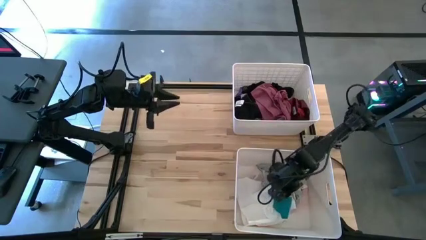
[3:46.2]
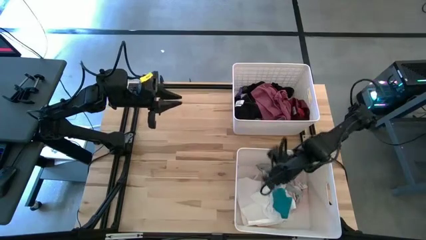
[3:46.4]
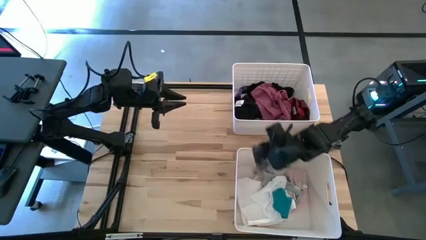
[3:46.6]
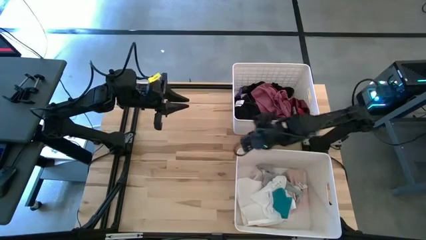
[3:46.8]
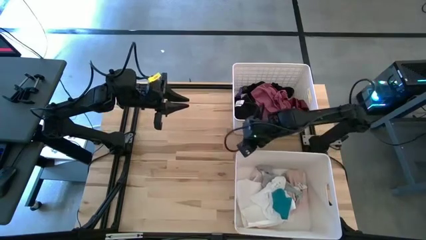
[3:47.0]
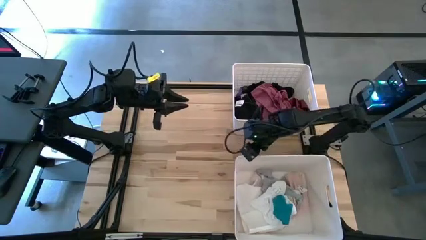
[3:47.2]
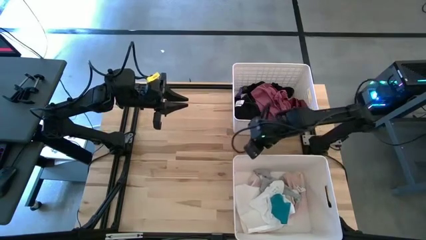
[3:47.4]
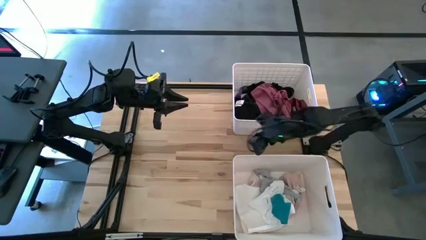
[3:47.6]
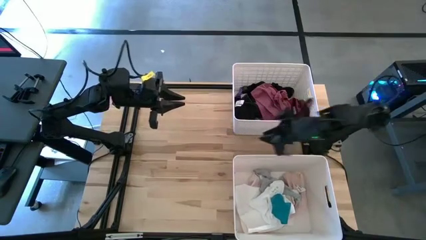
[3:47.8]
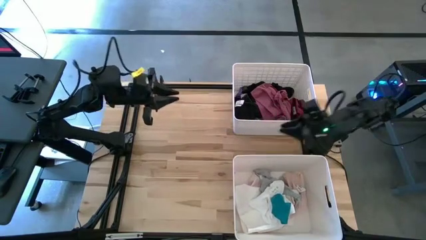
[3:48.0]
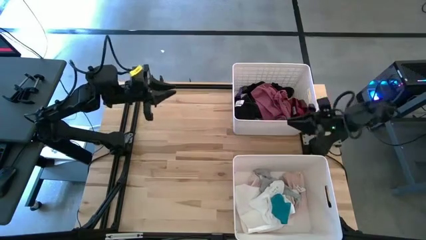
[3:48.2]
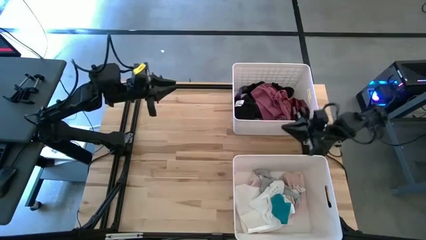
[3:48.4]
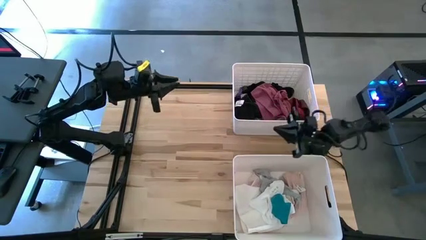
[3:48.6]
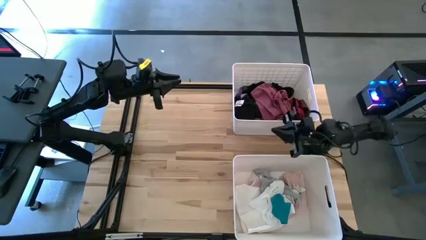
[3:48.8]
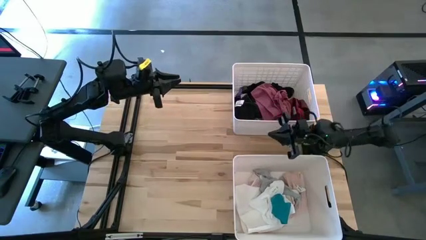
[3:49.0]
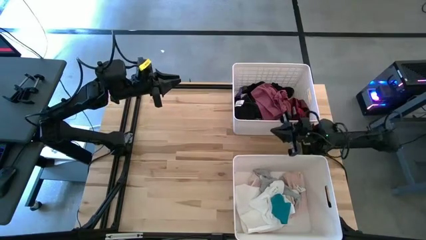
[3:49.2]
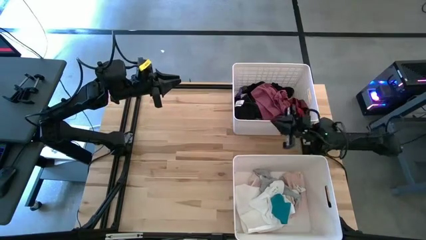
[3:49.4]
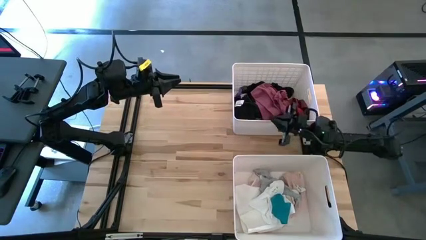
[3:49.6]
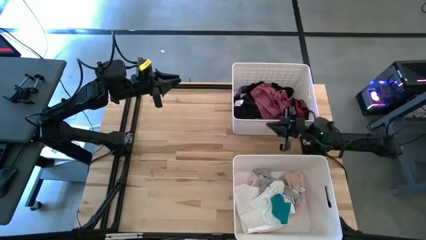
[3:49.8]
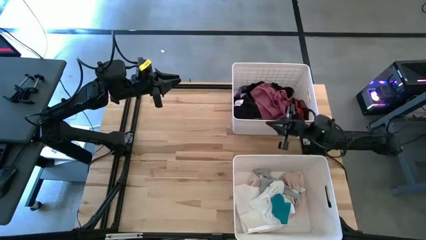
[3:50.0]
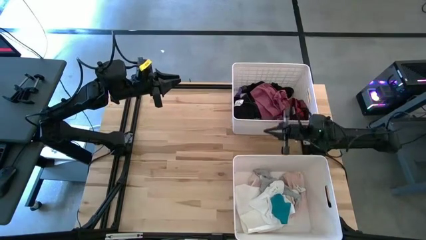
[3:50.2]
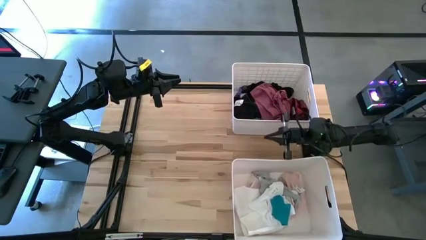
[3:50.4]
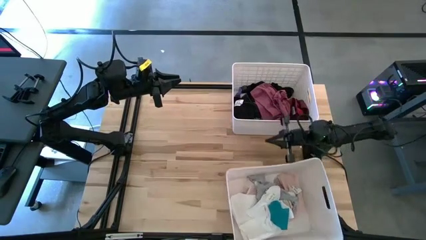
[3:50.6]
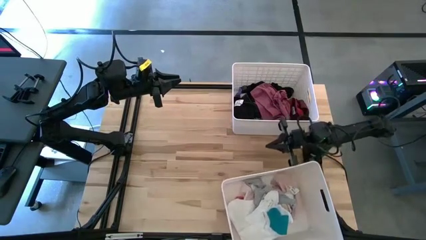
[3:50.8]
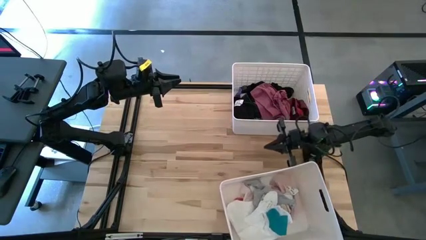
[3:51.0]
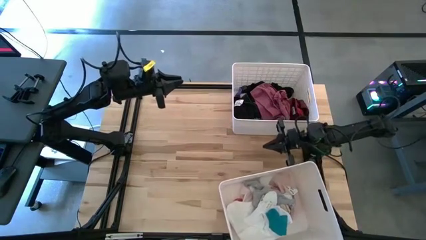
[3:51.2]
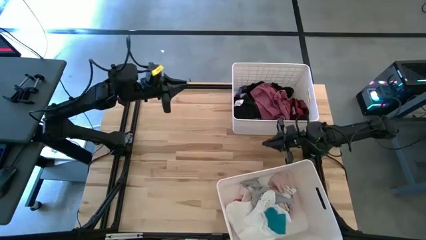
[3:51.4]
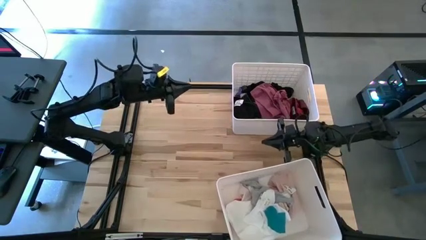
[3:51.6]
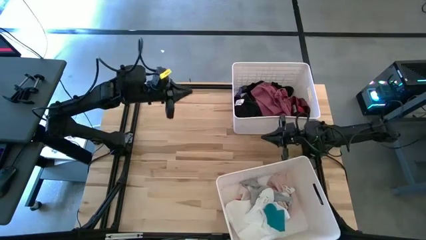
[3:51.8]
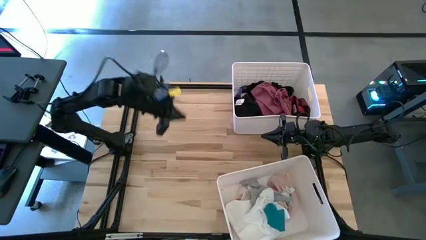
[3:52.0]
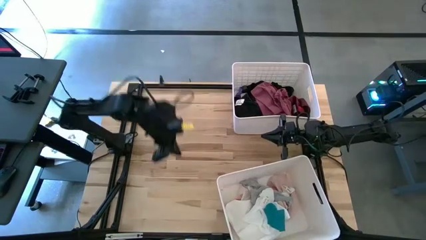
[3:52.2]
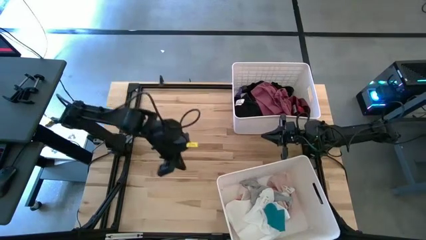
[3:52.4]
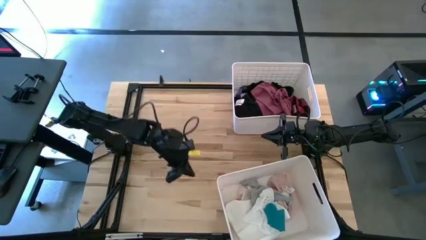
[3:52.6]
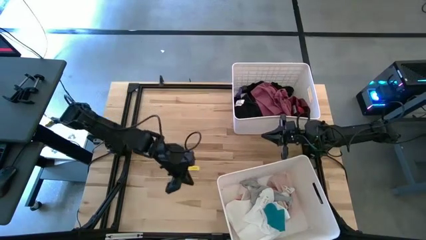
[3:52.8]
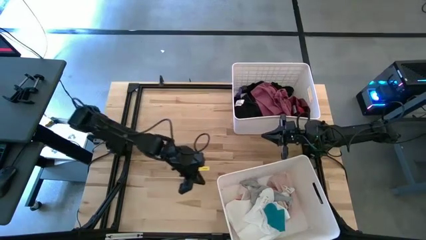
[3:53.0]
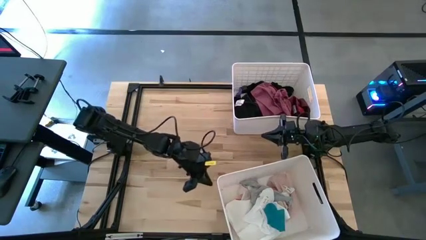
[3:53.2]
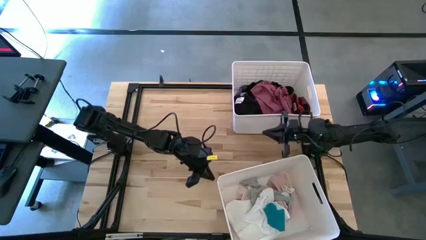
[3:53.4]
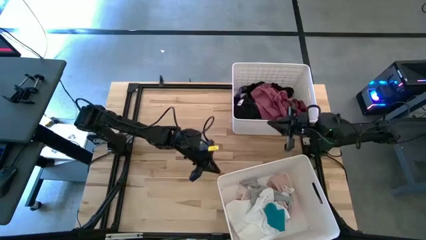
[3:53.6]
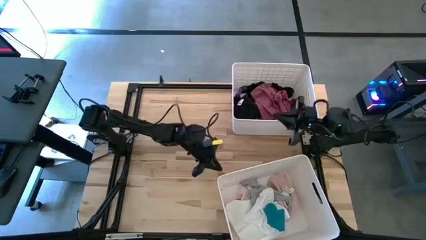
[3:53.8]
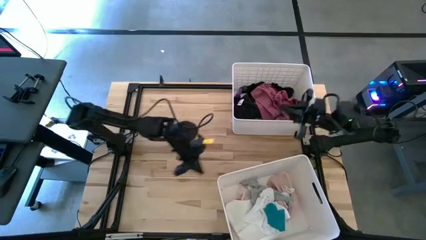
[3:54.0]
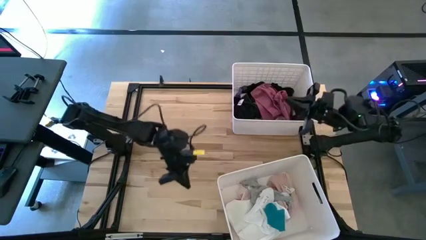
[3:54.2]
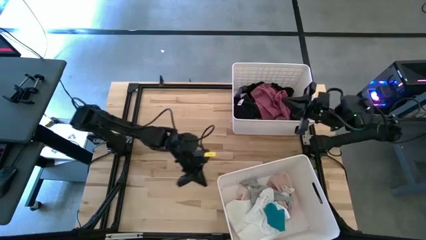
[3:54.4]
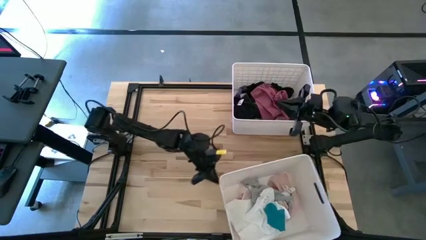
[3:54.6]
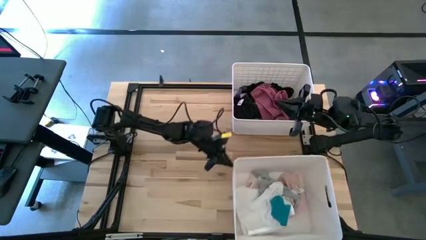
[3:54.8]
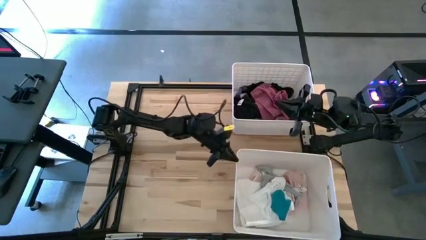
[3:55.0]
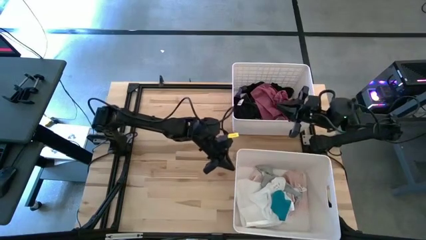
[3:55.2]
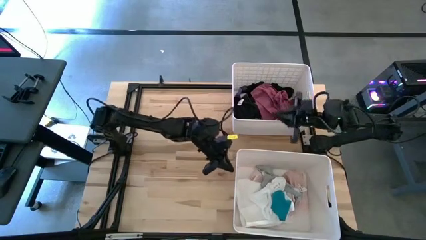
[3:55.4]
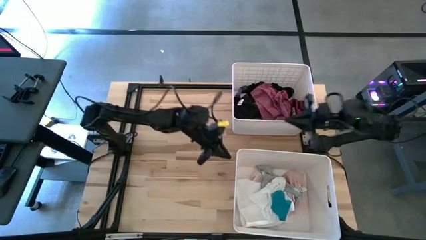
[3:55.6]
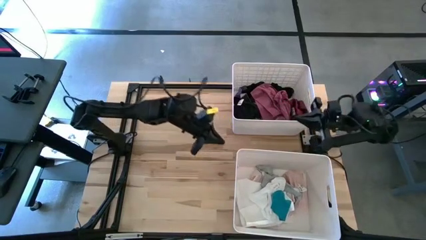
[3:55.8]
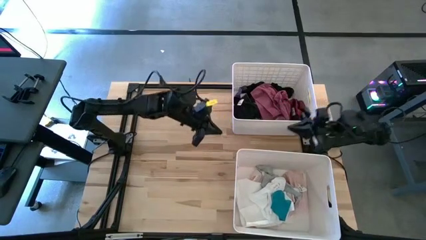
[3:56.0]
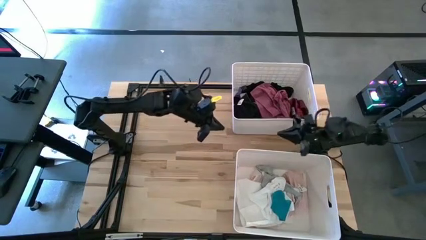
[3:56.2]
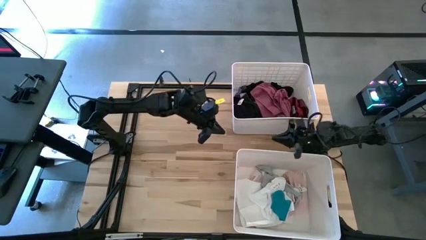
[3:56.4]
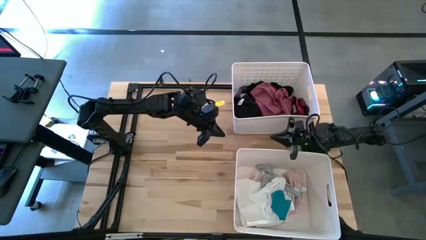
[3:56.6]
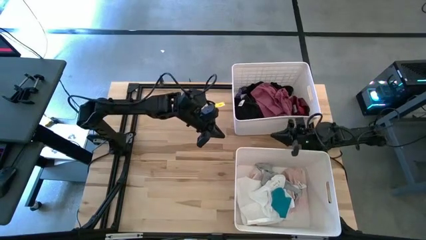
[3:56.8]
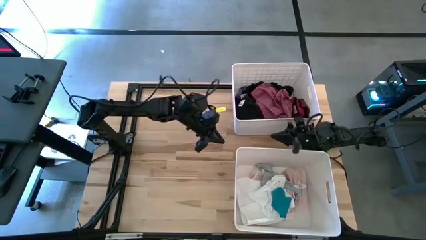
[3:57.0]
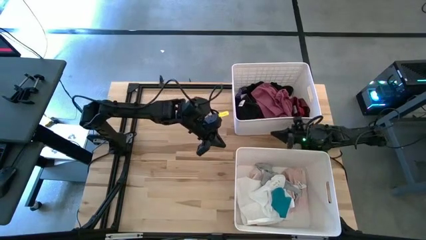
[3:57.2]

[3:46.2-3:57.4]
Task: Sort clothes
Return to home position
